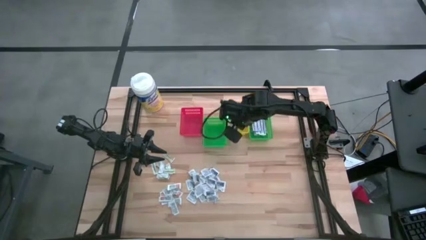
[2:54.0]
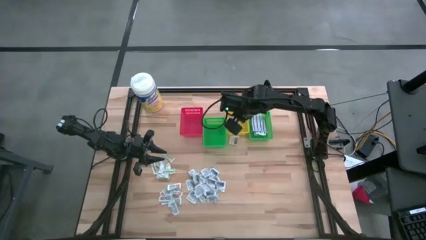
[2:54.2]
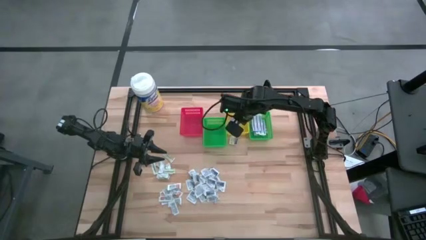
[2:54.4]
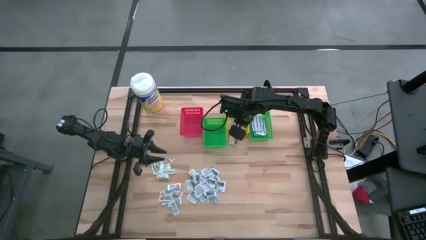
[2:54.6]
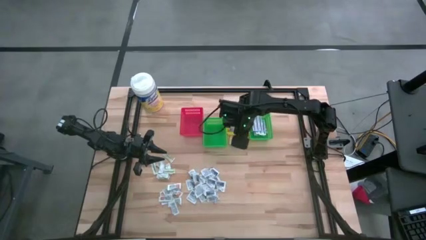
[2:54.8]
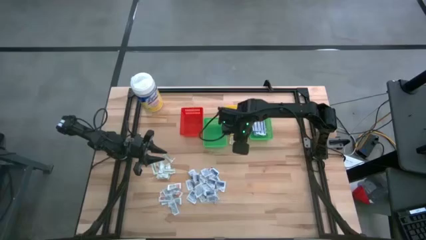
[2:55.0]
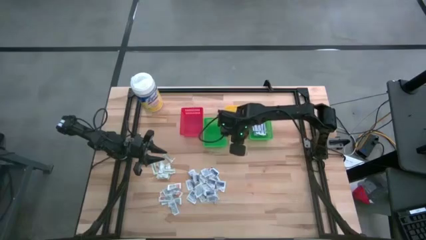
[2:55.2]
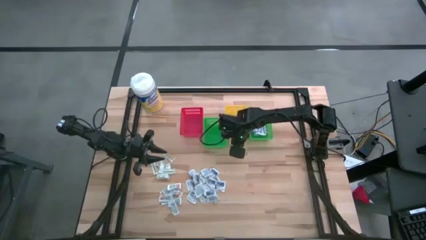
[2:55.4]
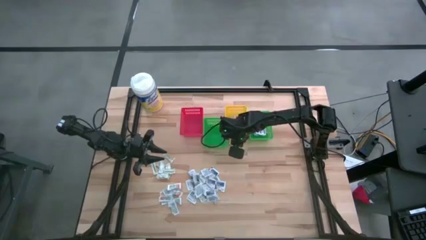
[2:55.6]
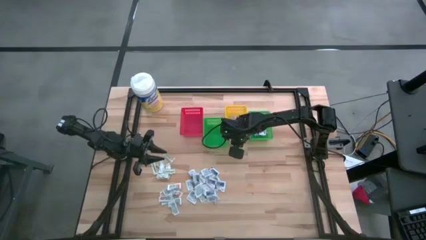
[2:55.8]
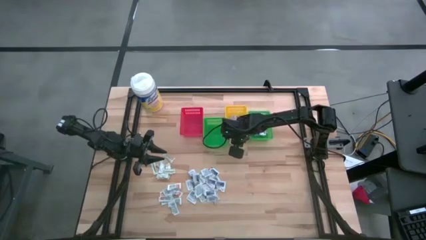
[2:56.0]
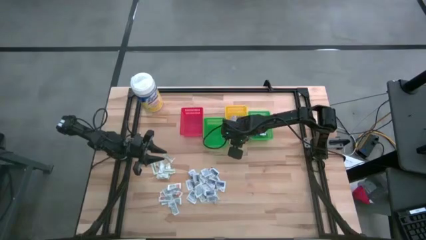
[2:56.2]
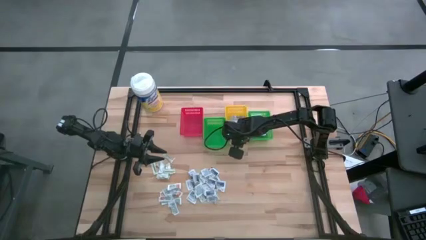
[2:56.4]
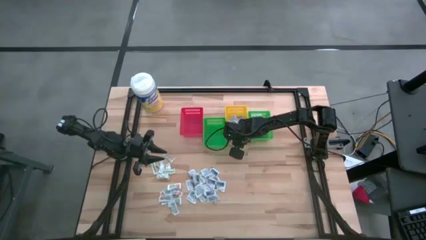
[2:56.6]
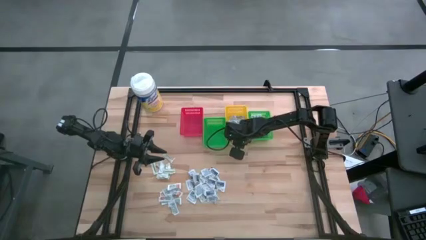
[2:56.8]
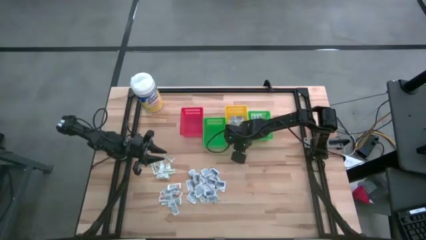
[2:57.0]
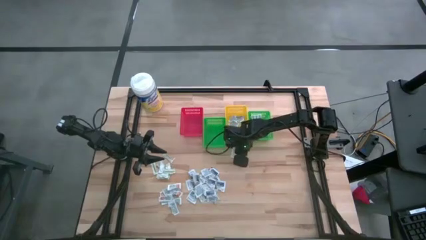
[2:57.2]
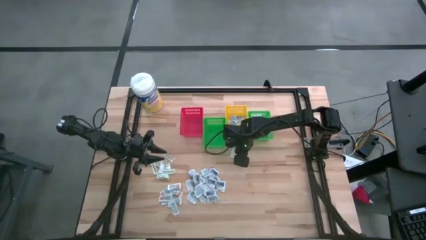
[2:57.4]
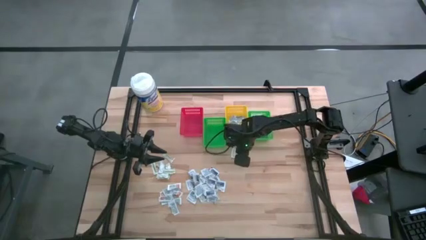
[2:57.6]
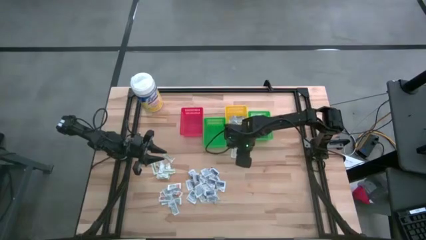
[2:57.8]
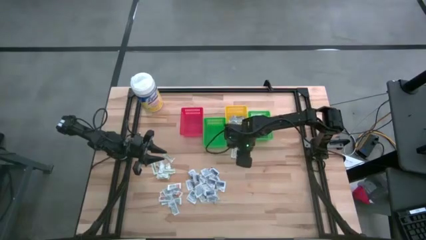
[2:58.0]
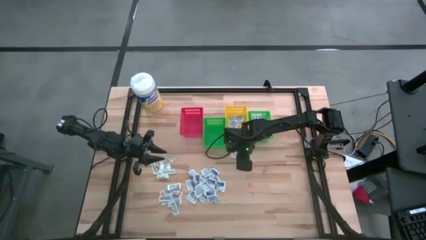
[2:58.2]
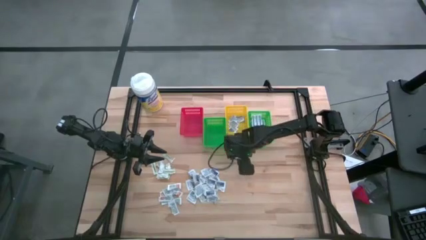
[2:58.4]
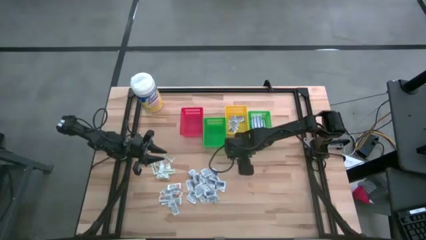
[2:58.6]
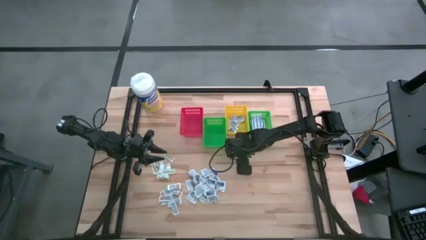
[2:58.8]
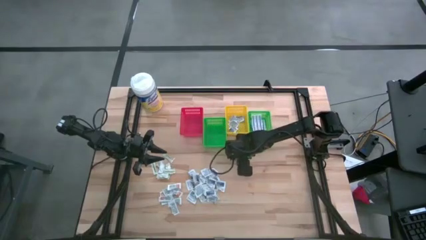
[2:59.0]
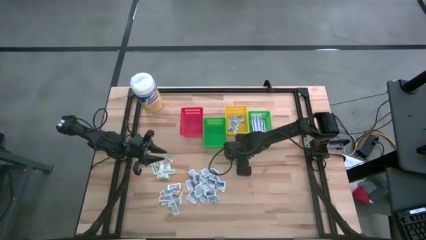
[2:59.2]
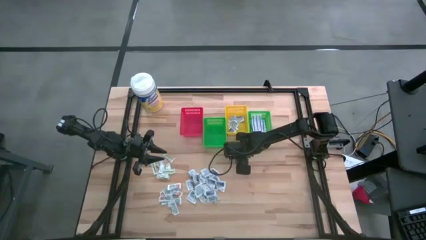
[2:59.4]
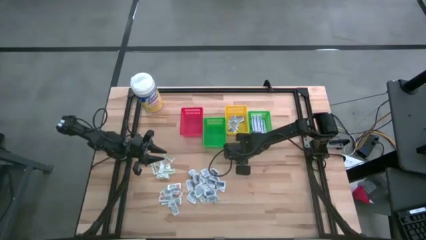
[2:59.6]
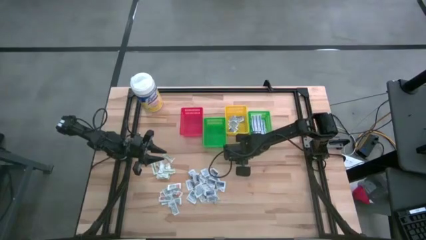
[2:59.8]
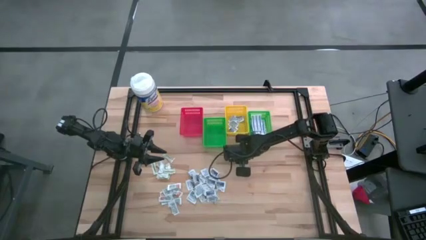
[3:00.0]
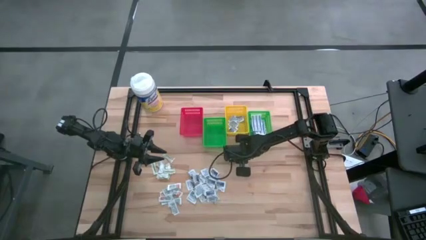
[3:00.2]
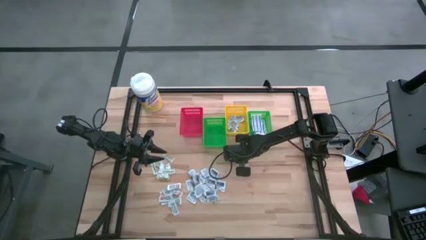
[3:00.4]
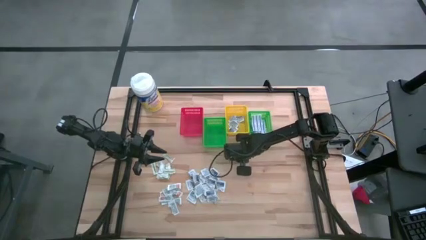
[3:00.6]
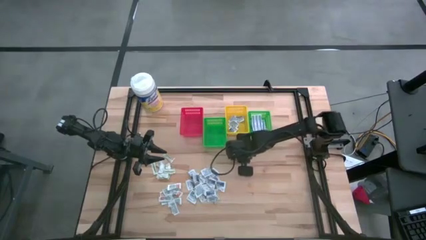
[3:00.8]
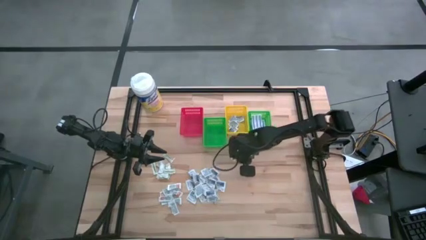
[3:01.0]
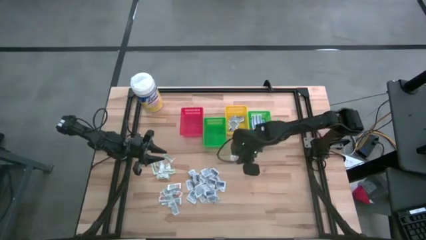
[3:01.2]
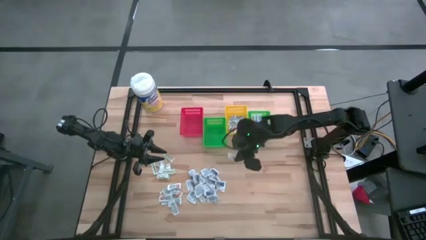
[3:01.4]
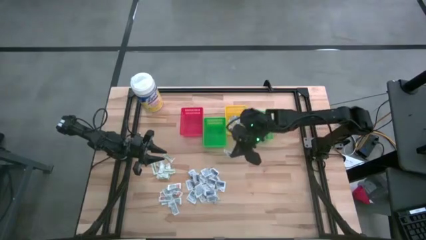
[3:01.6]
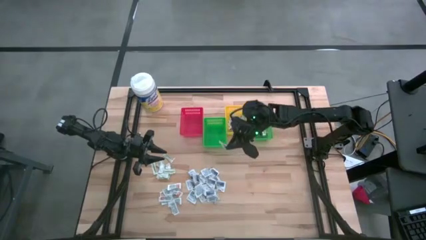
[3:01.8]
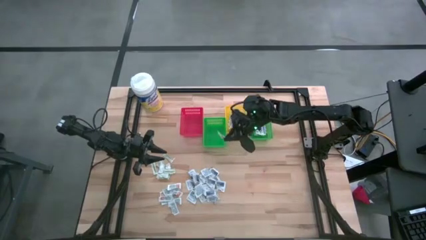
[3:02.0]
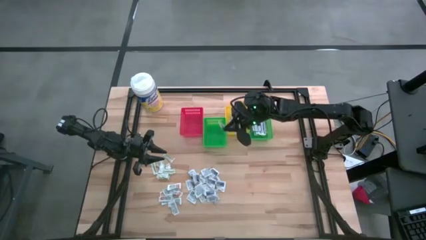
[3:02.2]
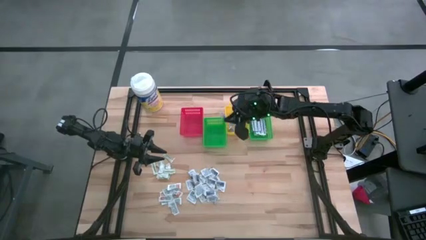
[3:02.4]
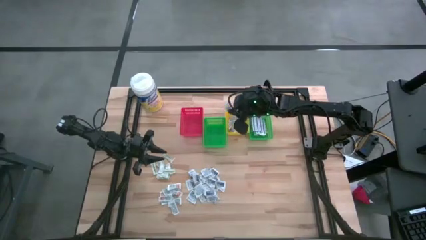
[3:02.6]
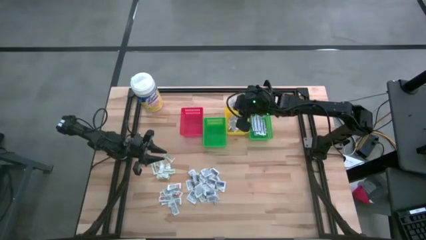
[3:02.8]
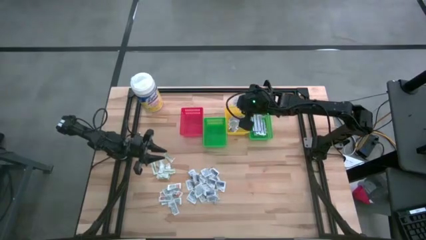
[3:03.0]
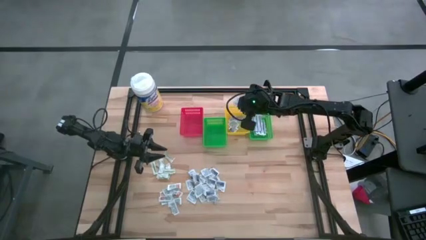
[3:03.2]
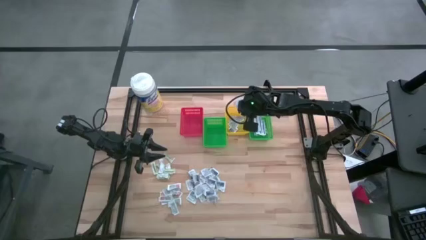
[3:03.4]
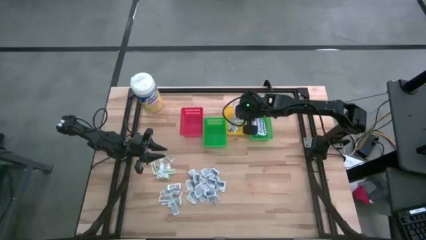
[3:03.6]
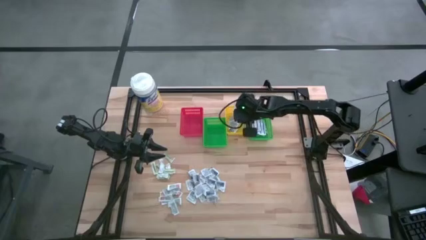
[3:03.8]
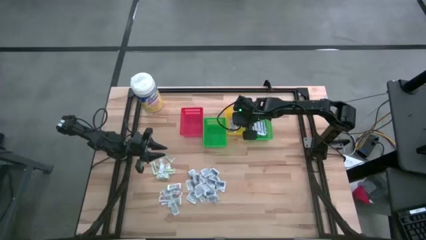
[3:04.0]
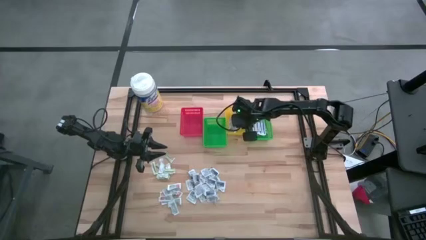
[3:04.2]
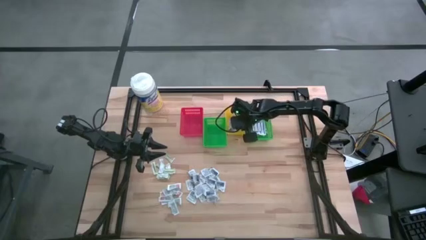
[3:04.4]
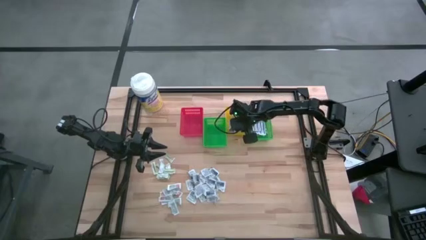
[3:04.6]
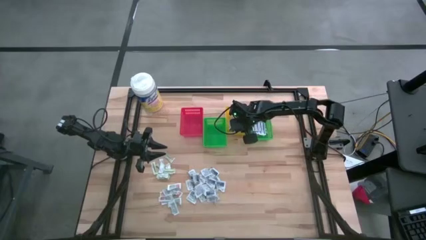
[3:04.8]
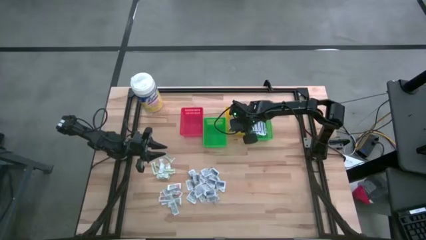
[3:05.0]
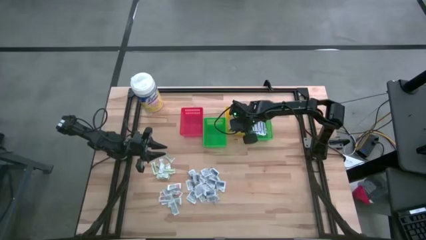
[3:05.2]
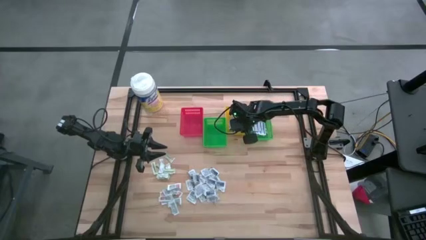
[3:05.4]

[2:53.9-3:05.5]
Task: Pick & Place First Aid Supplies
Put the alcohol pad into the yellow basket

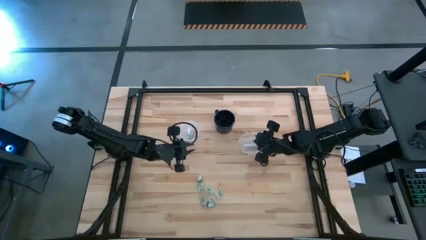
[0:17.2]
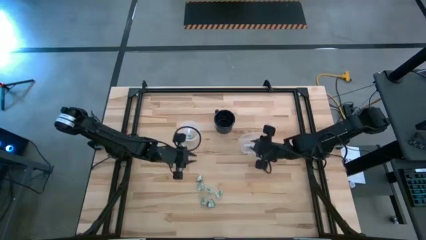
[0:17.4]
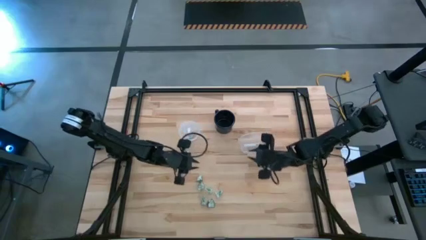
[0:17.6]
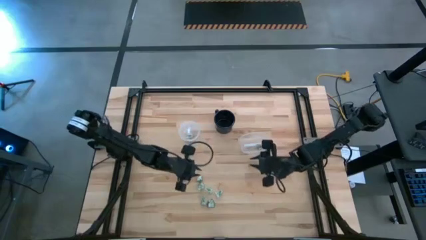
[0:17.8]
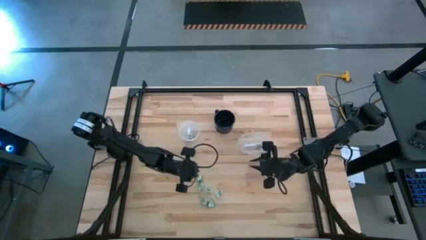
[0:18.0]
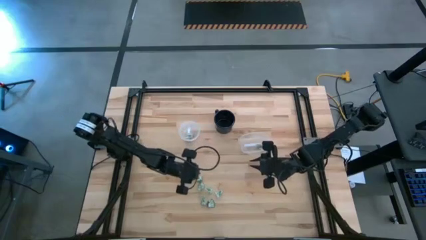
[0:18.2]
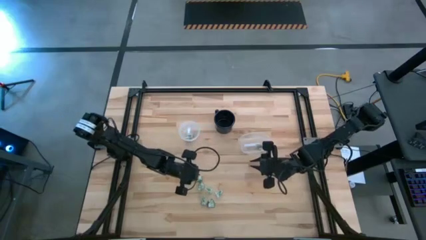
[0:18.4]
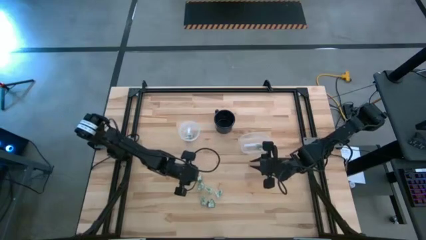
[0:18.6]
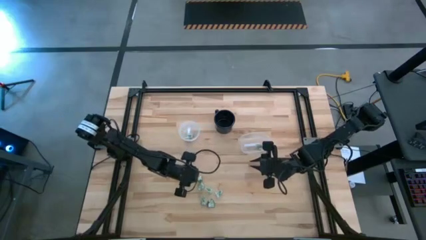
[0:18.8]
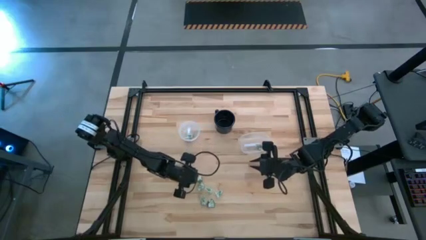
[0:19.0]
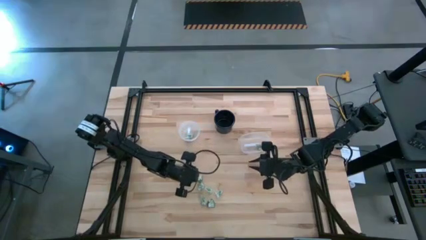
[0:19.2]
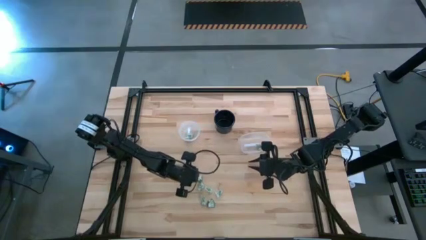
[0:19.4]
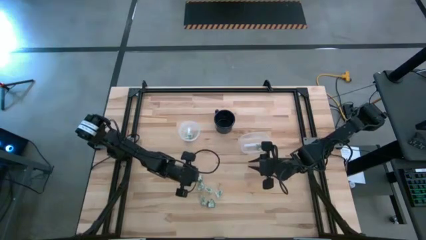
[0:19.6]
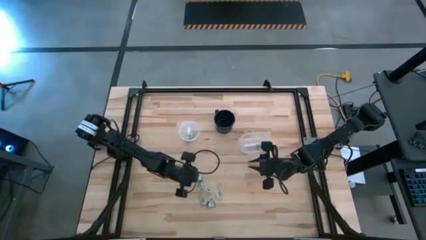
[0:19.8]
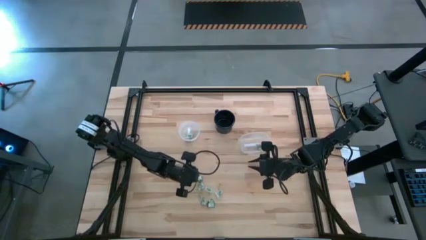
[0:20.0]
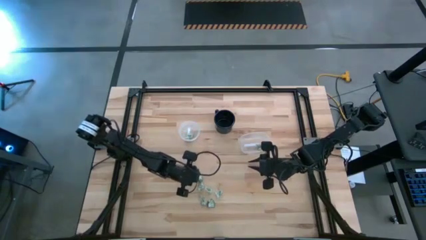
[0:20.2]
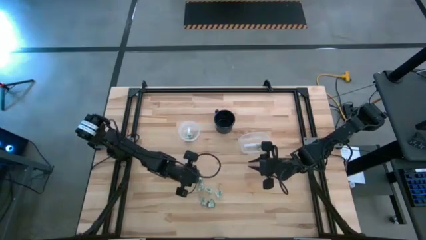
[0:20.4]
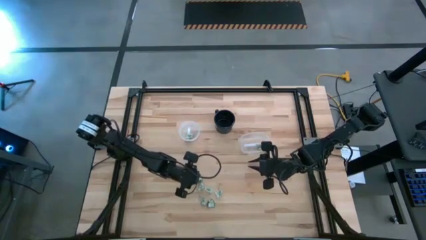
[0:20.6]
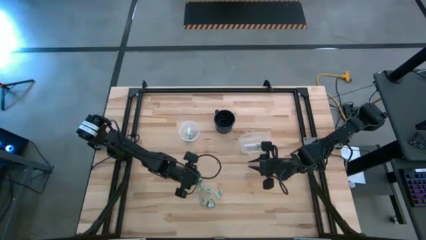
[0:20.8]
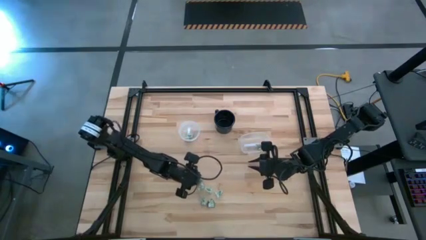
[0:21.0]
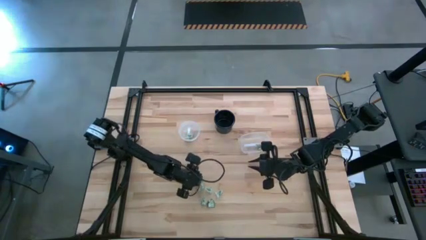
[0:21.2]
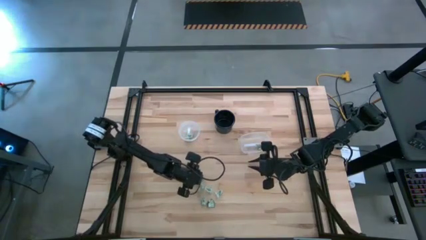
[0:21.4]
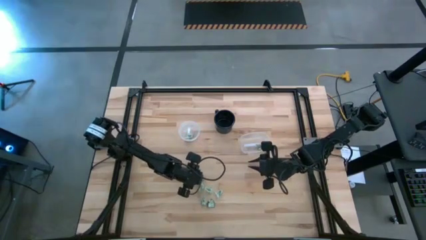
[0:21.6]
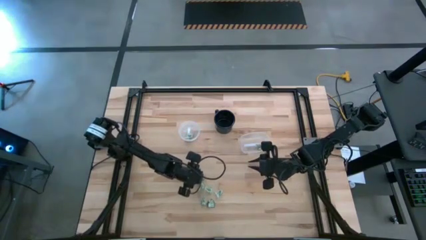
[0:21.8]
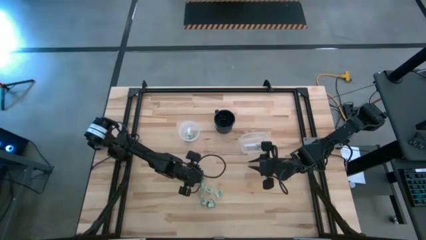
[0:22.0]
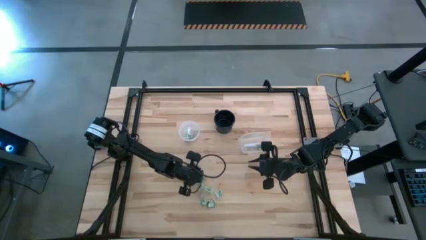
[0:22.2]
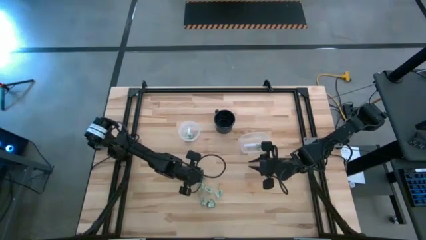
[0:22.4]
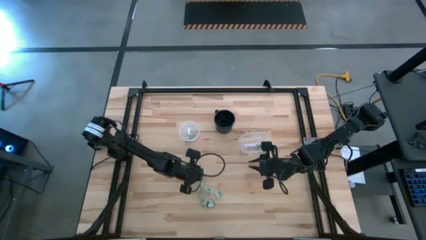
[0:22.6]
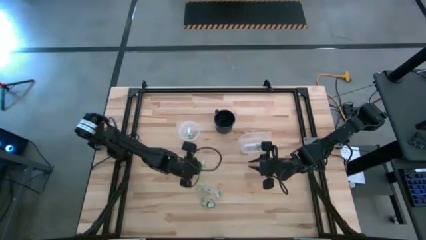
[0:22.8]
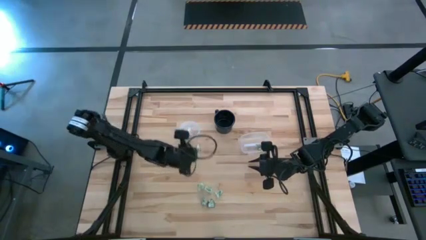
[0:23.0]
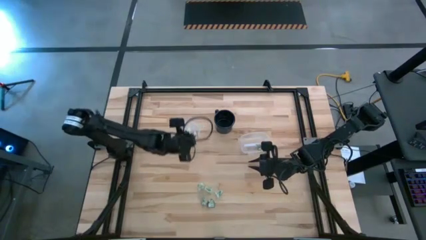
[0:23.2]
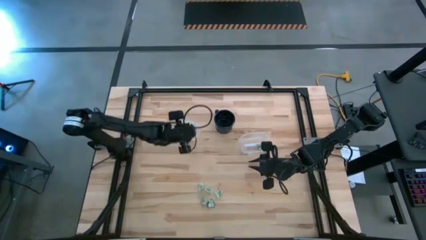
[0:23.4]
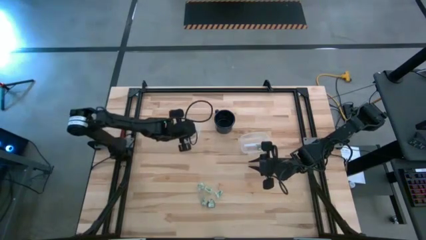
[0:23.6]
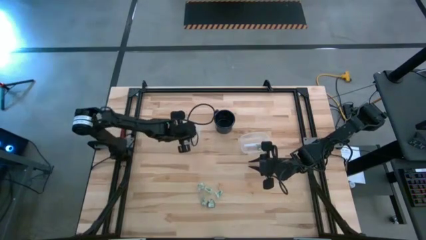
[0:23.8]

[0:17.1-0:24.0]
Task: Pick and place items into bin
Put the green stevia packet into the left transparent bin
